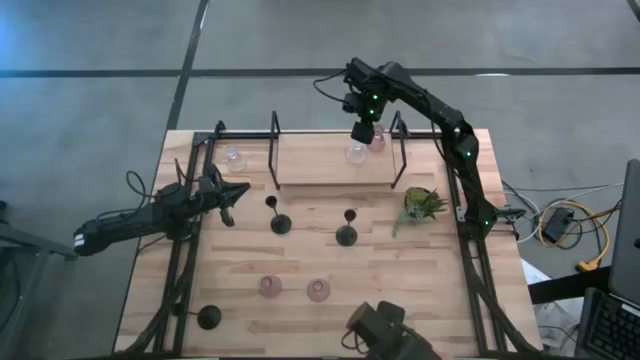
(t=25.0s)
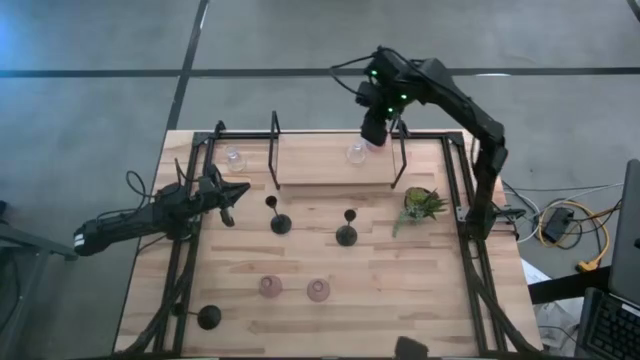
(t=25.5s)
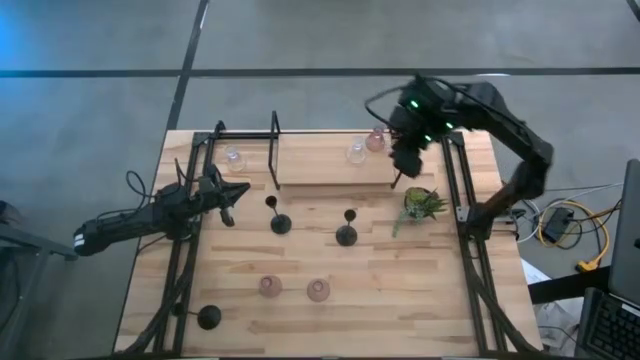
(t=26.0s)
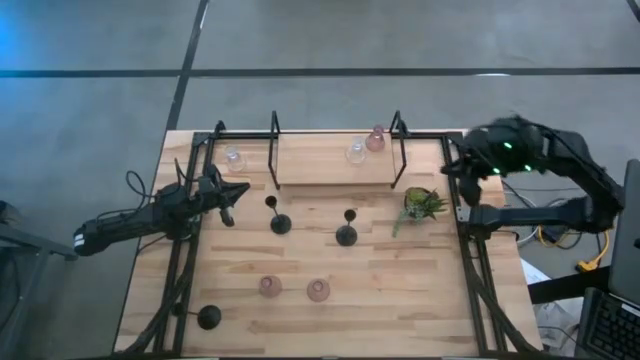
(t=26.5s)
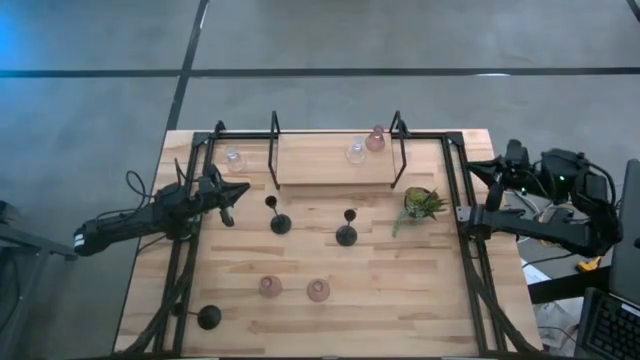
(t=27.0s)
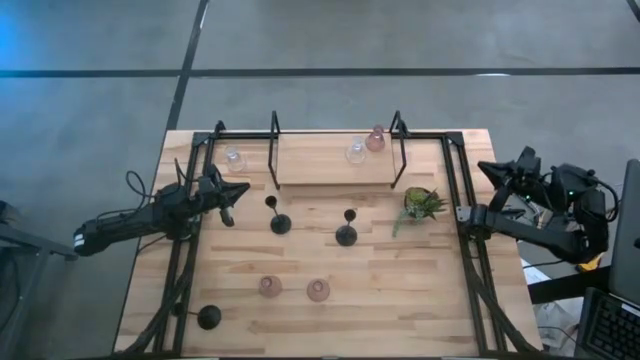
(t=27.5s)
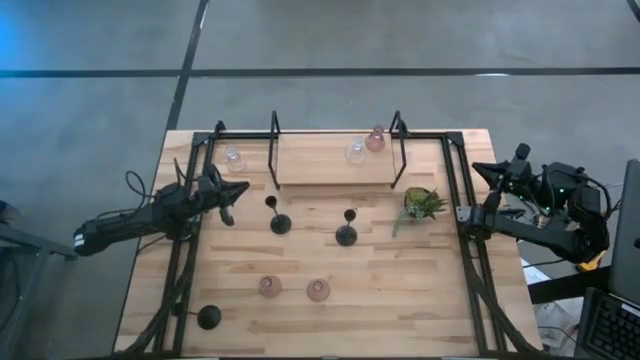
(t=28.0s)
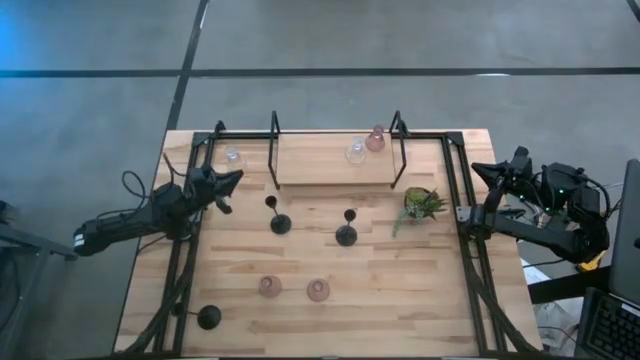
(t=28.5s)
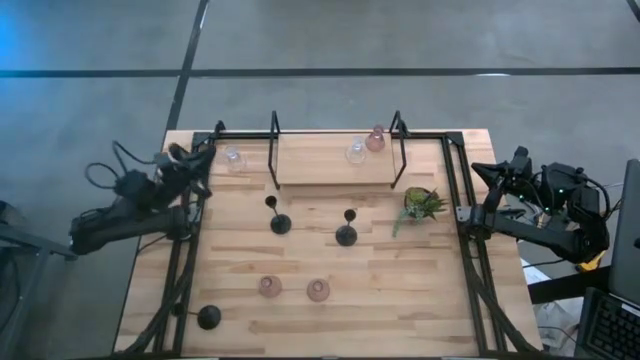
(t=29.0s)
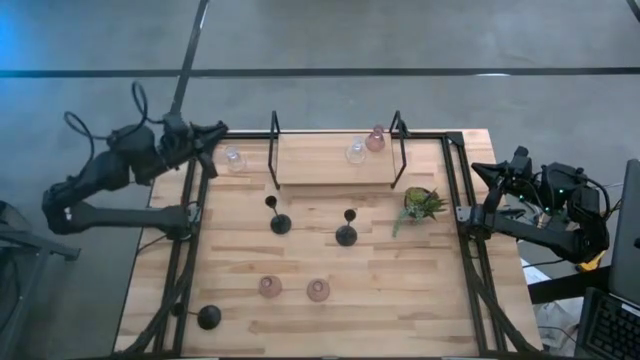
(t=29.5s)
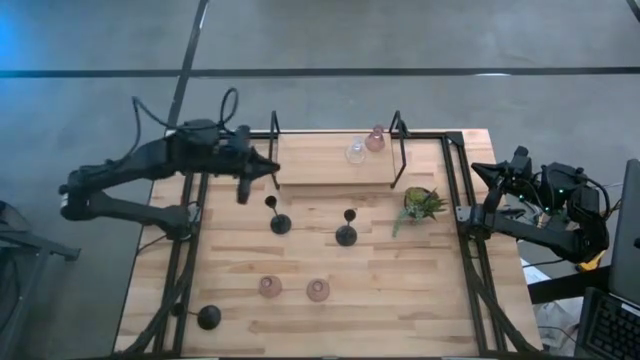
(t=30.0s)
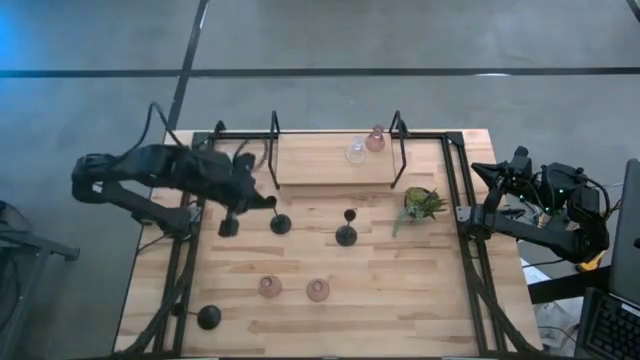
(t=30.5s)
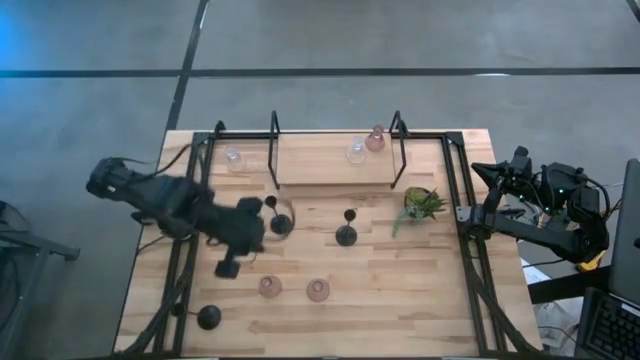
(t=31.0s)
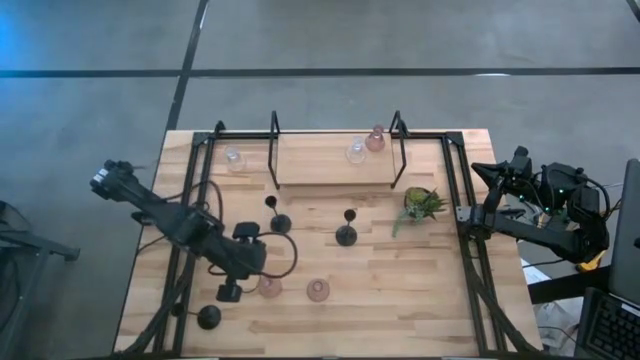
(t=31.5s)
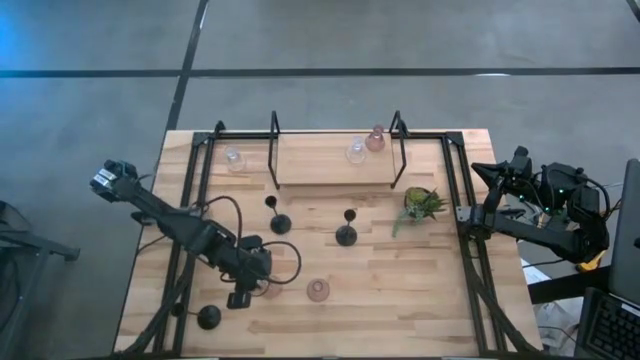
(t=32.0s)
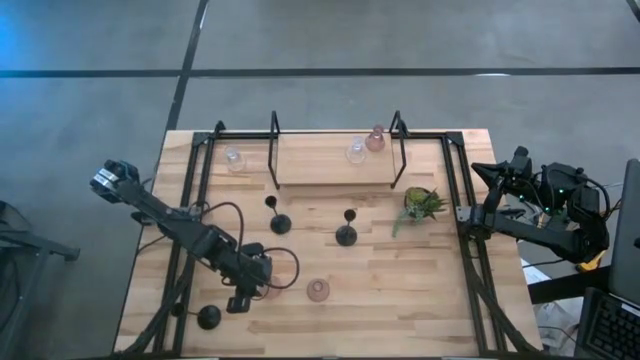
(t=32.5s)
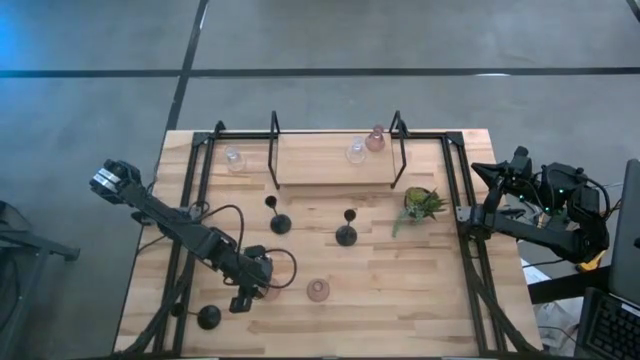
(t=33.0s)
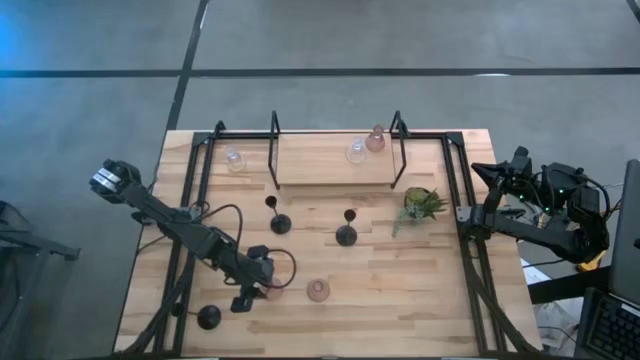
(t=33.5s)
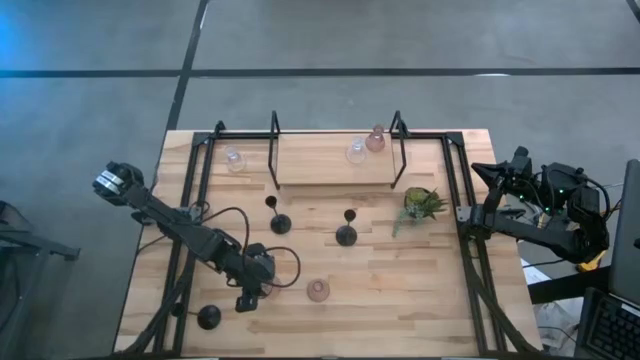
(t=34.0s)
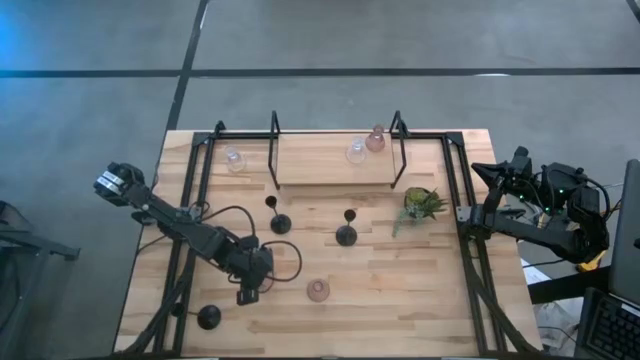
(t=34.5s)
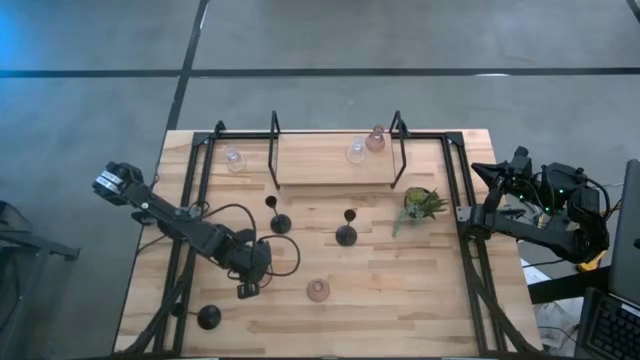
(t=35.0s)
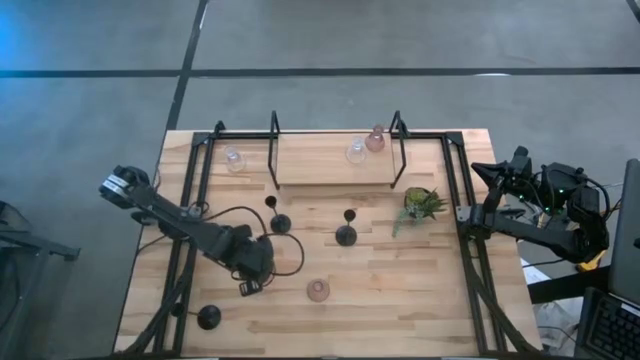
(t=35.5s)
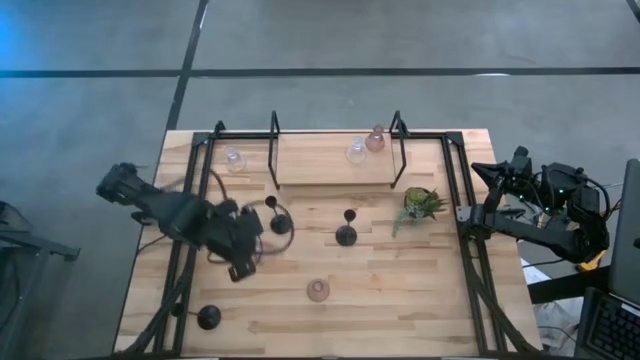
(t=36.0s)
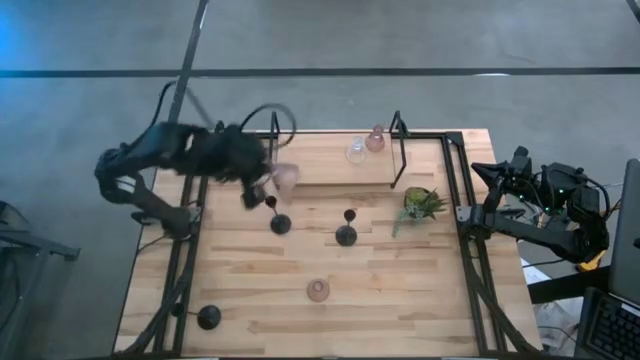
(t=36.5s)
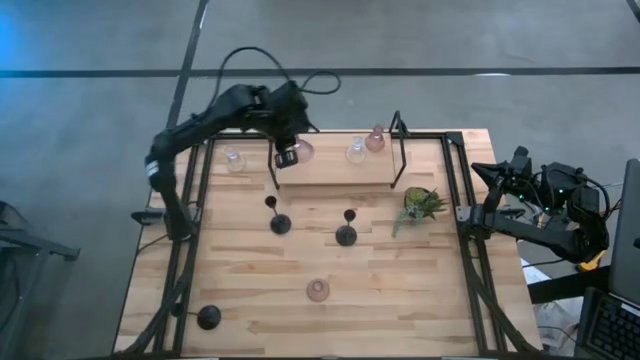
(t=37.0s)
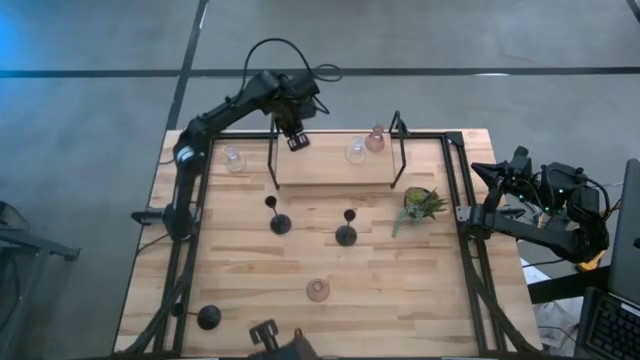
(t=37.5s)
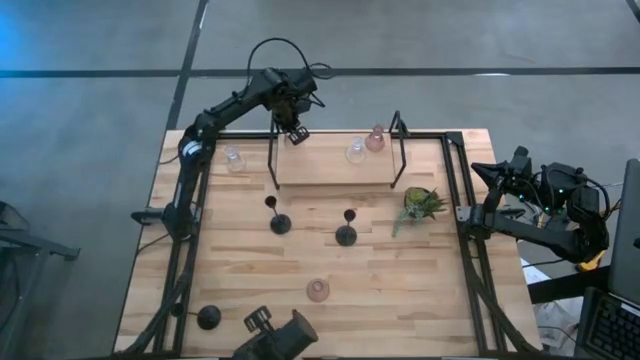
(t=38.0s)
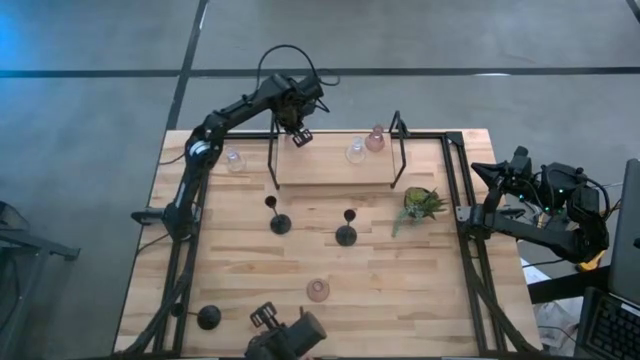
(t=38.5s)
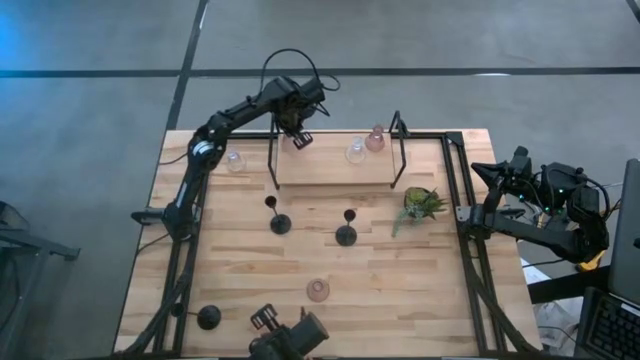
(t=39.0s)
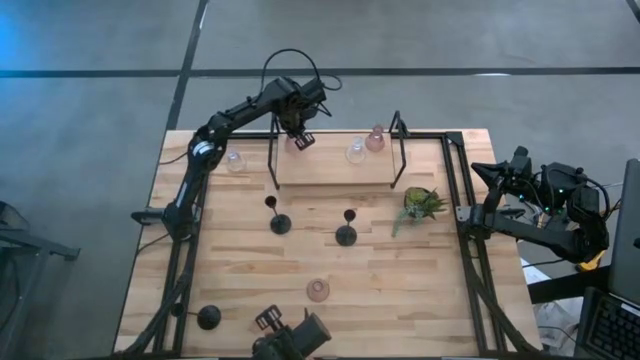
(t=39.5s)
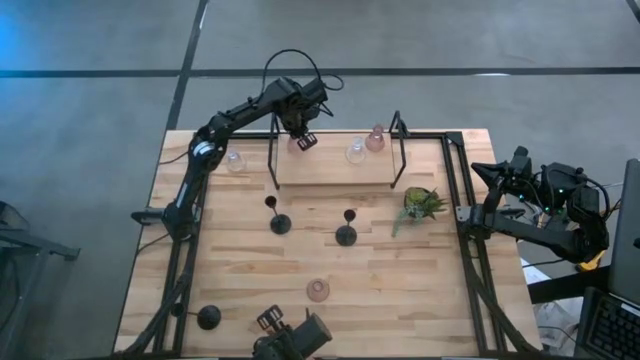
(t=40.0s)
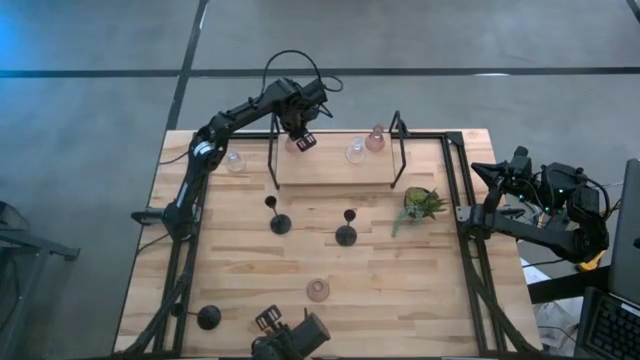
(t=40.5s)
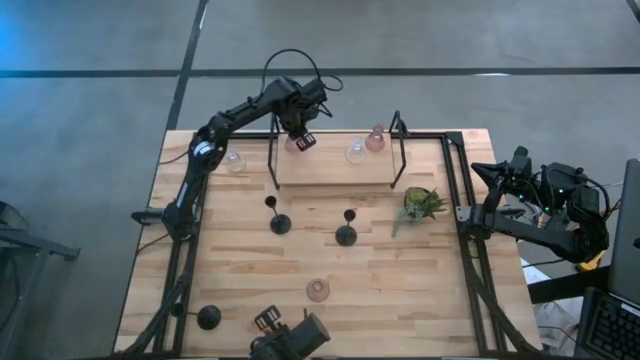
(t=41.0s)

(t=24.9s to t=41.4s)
Task: Pick & Place candle stick holders
Put the left pink glass candle holder on the shelf

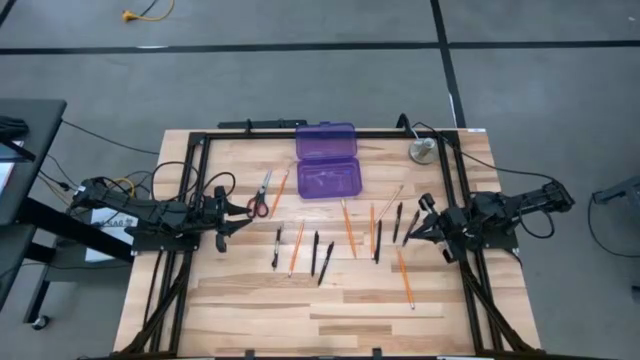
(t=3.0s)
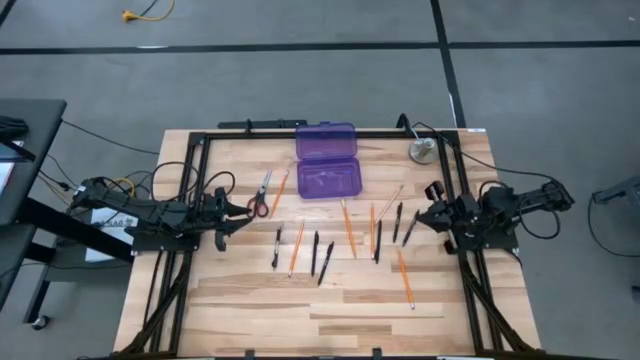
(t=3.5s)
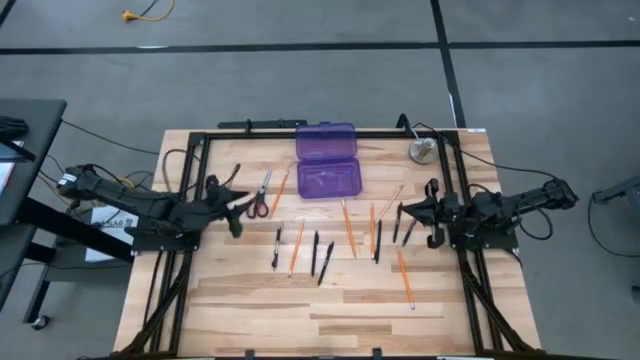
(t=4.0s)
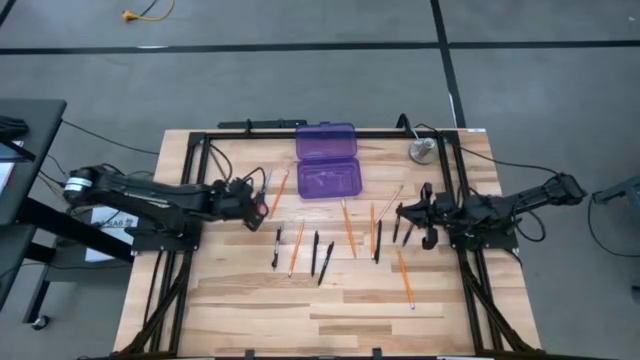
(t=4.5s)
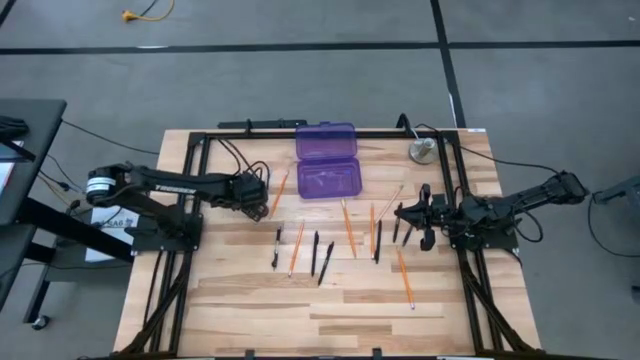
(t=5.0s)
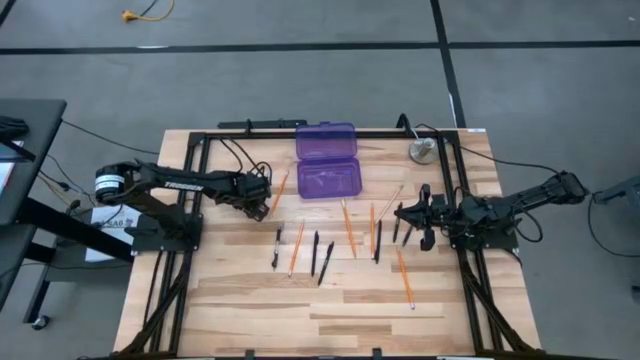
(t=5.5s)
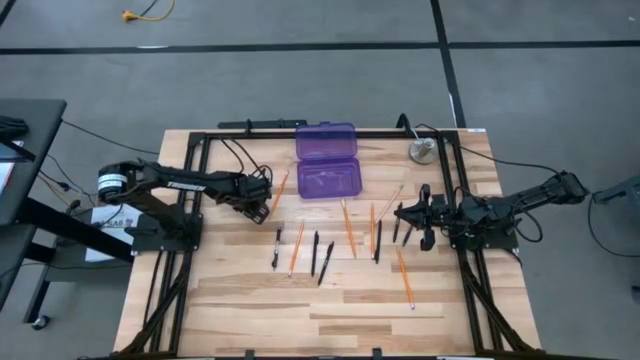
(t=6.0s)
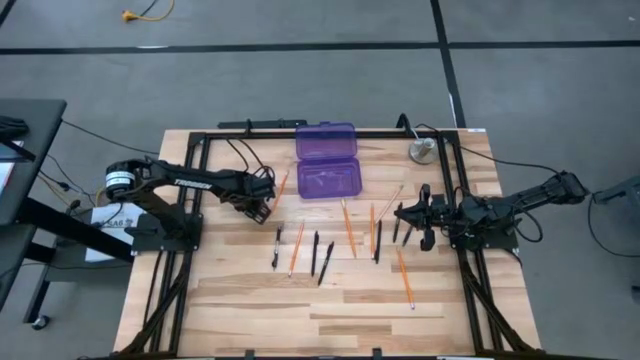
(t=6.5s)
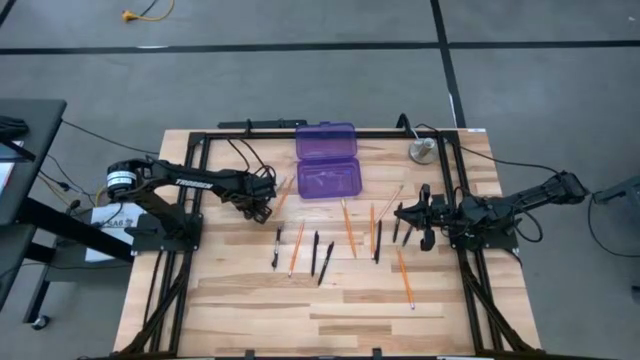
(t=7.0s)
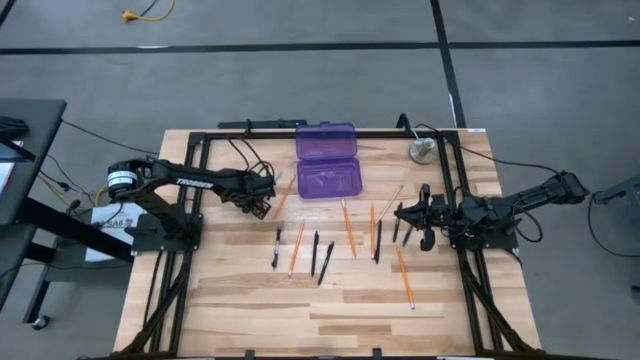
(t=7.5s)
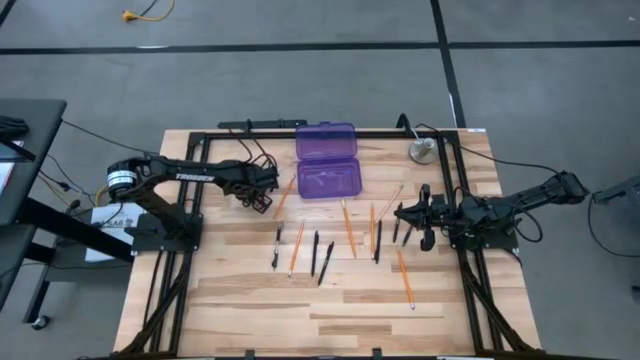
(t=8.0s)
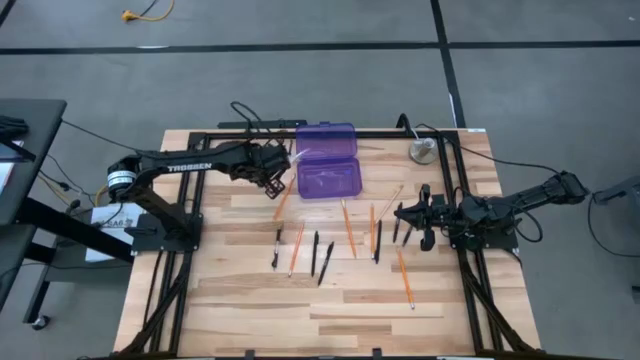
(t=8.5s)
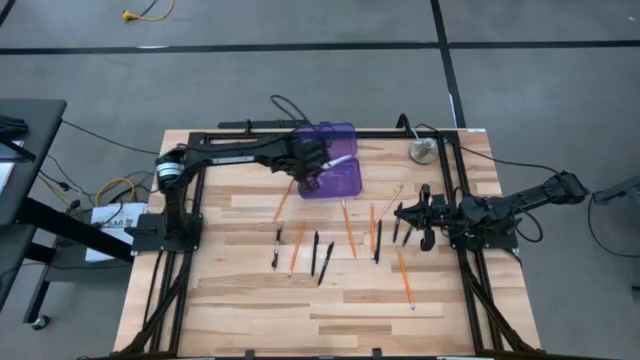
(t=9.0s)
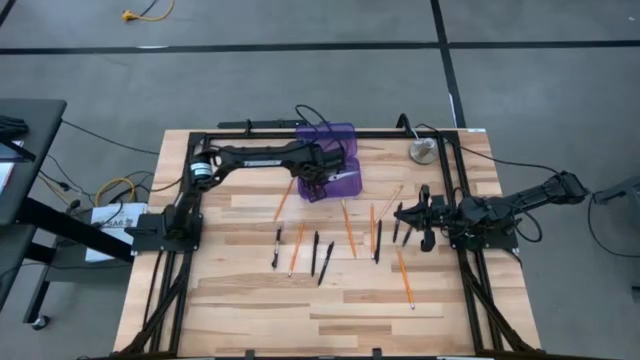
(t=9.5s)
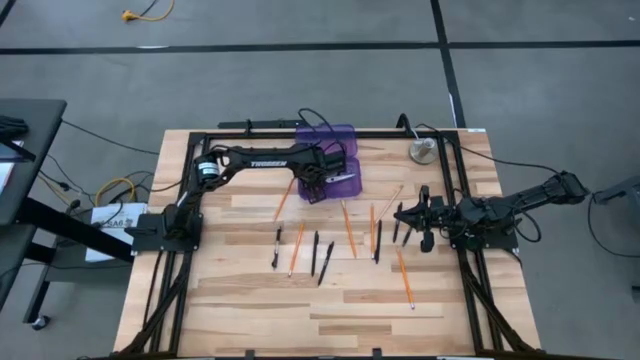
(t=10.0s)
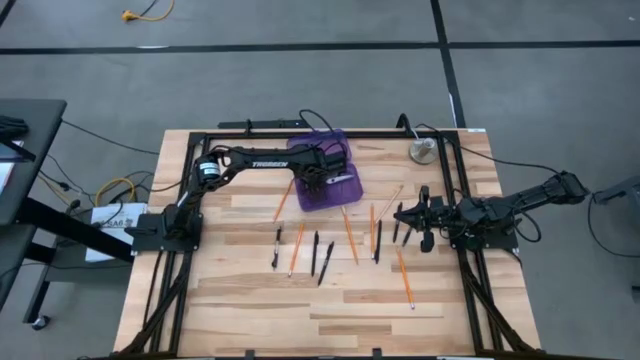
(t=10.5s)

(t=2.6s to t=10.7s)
Task: Pick & place school supplies into a supply box
Put the black scissors into the purple supply box
